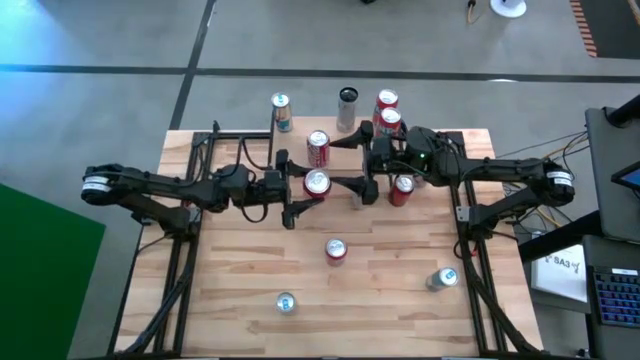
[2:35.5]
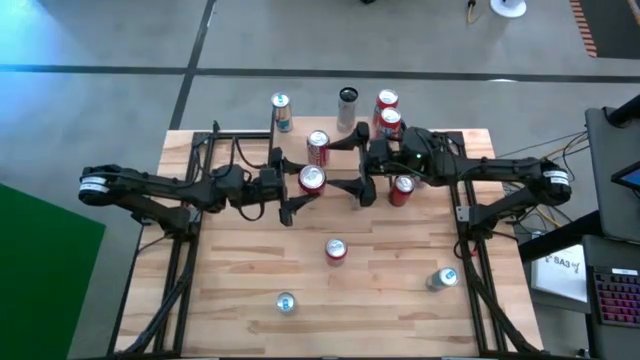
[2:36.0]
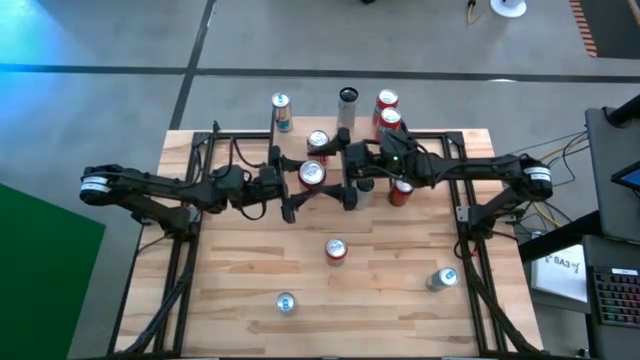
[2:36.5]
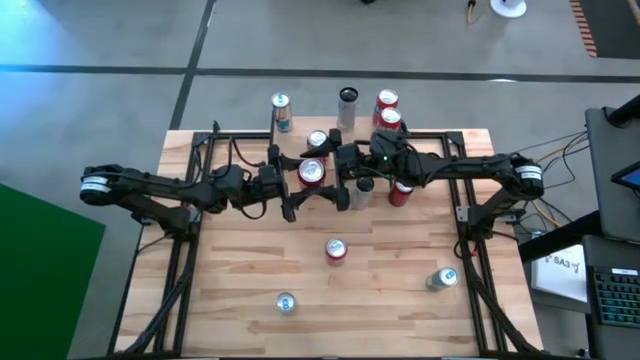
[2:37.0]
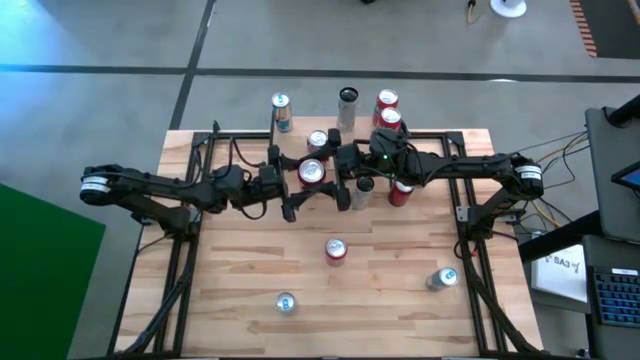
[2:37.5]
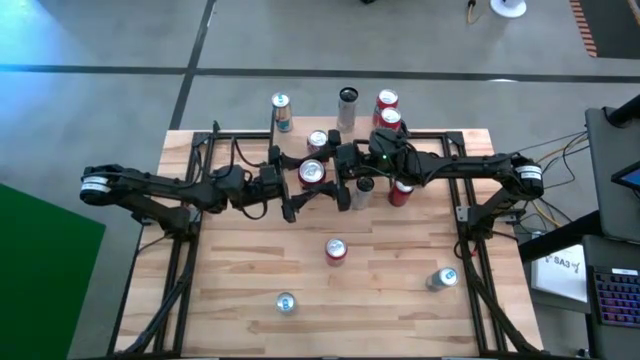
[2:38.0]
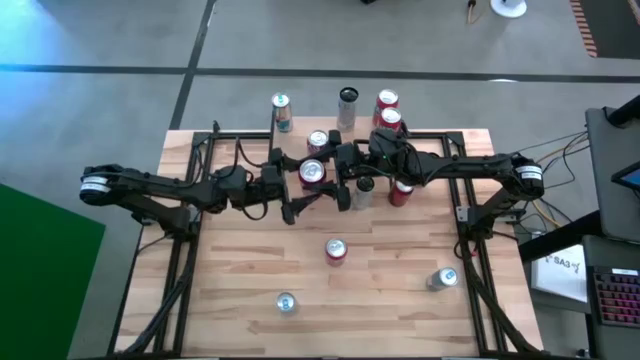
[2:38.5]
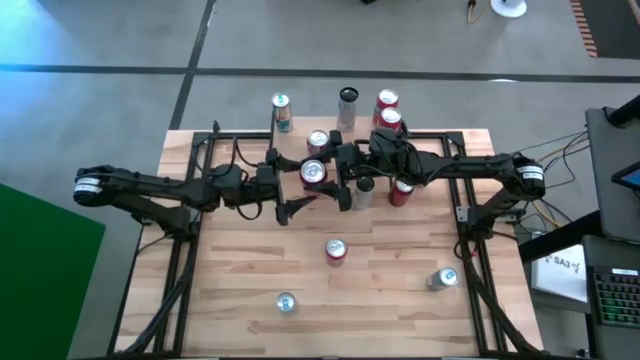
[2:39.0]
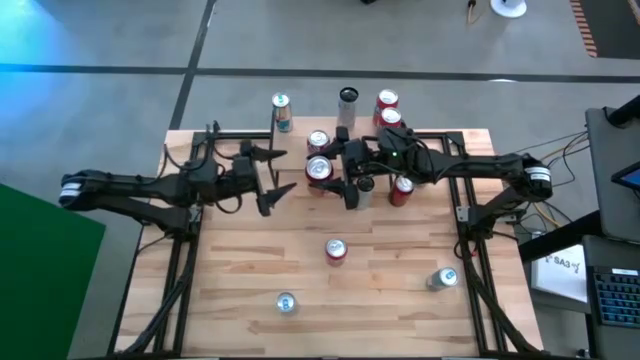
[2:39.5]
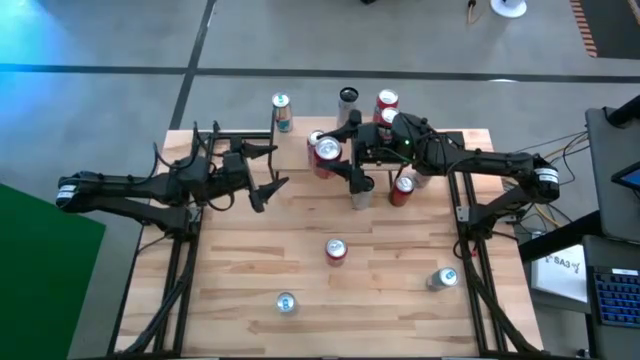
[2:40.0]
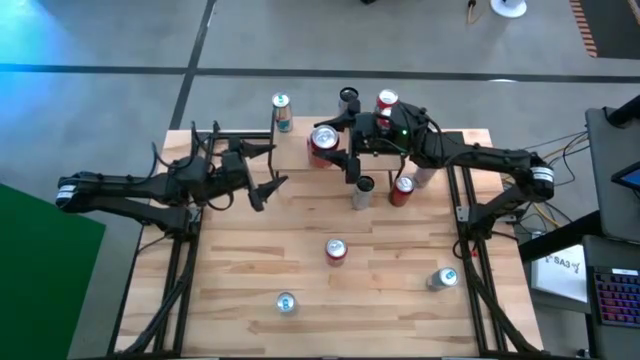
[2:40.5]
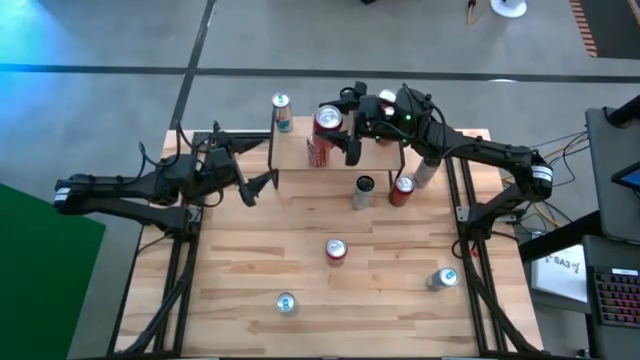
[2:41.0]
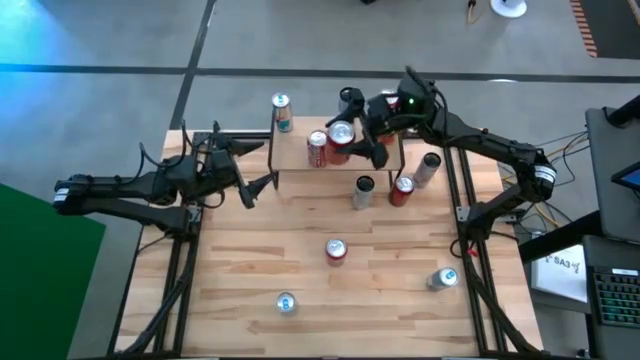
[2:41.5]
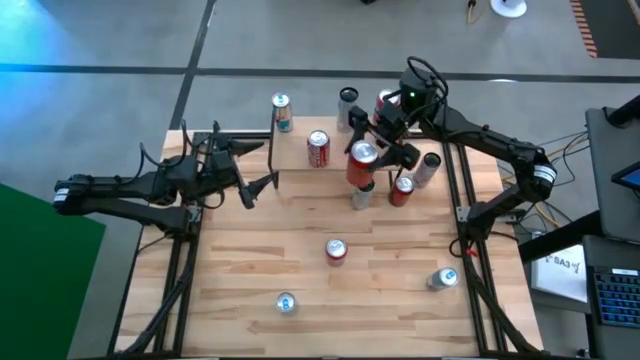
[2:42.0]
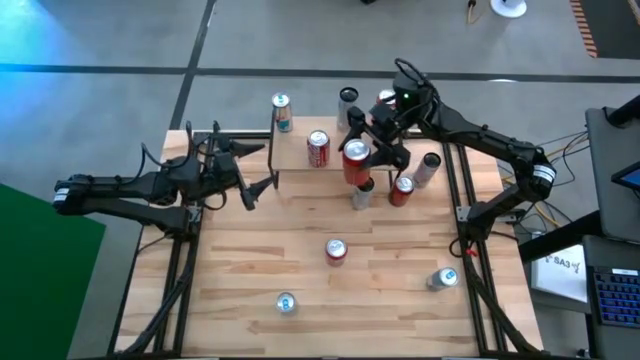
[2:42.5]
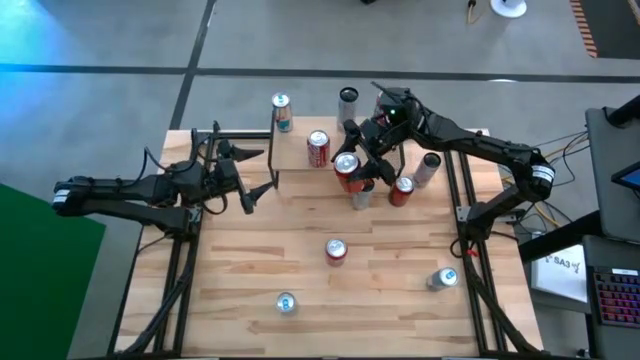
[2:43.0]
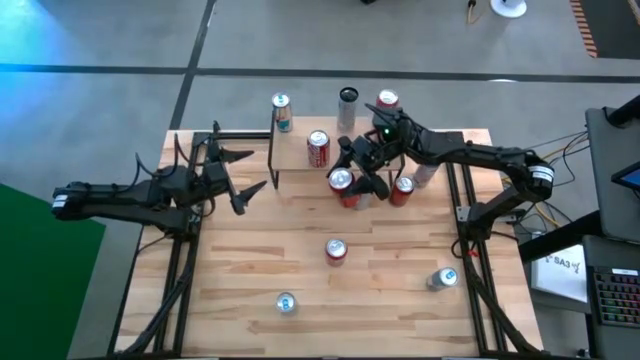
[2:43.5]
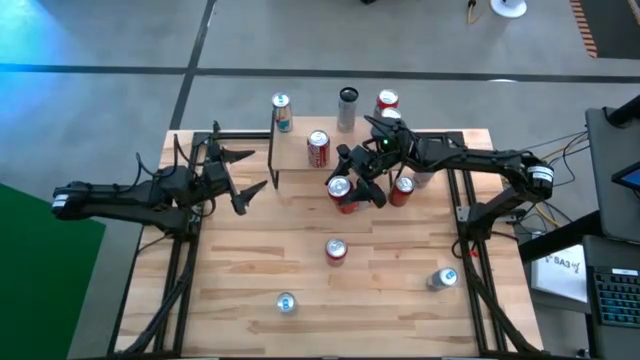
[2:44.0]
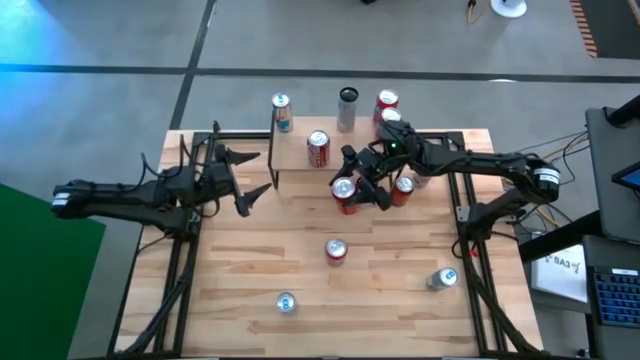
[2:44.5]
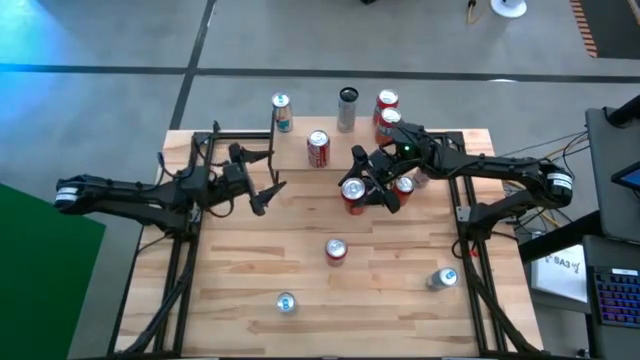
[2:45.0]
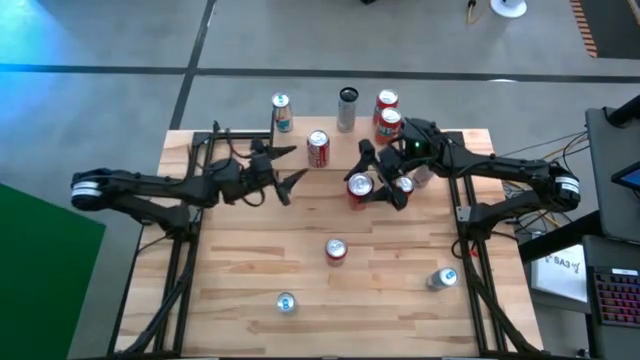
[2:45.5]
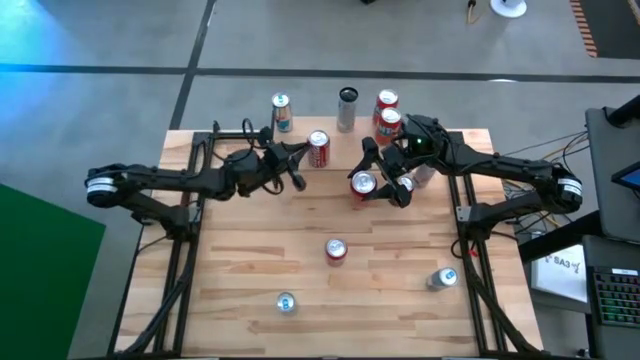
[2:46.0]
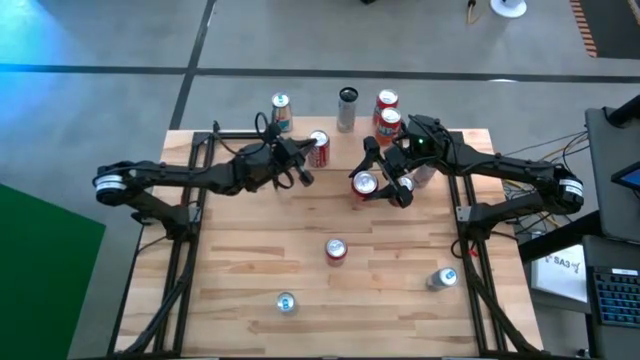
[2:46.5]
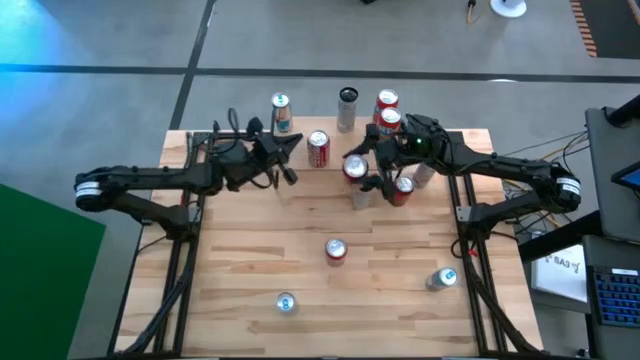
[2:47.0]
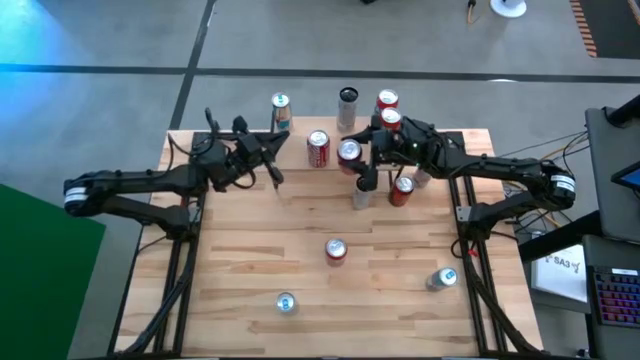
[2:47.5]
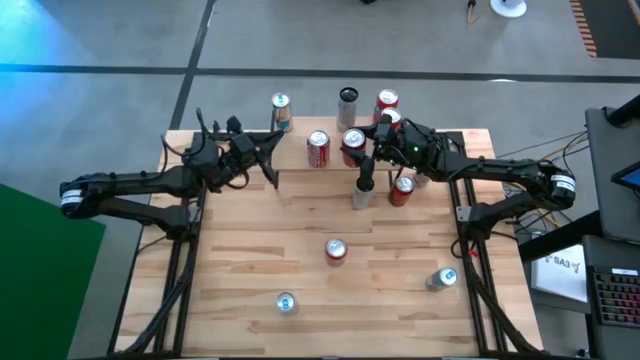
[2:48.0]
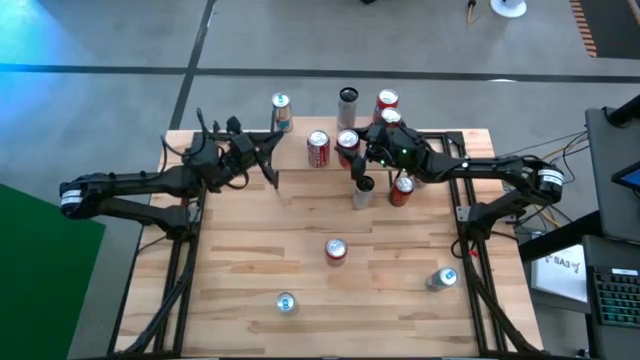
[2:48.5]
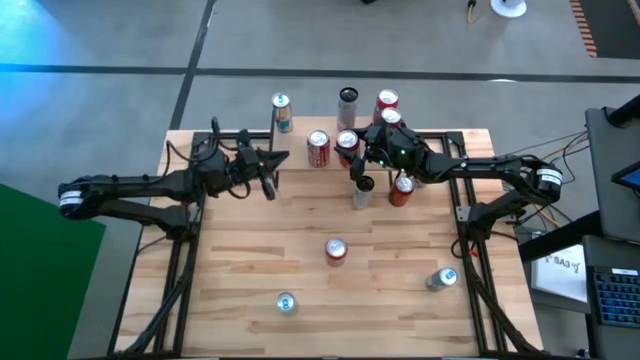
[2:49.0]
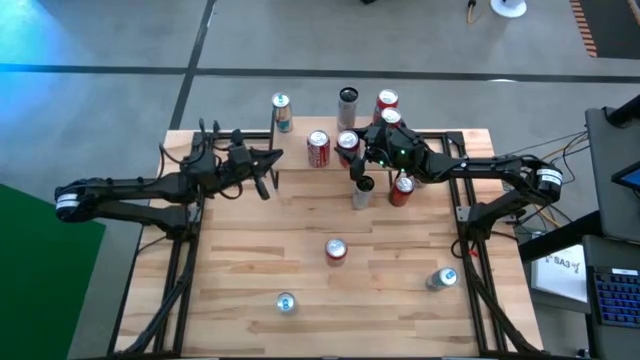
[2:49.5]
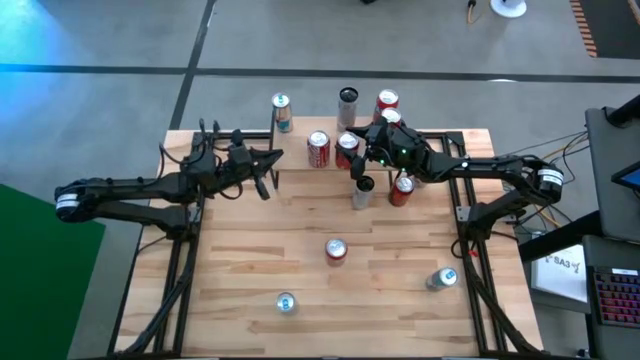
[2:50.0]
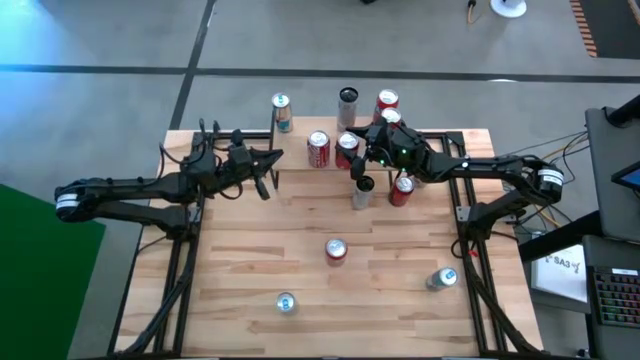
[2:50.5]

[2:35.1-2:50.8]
Task: Place canned beverage on shelf
Put the top red black soda can on the shelf

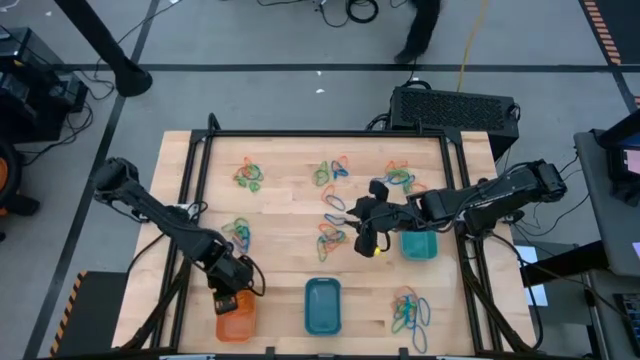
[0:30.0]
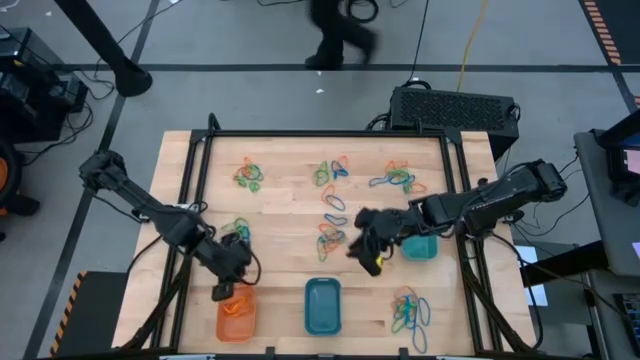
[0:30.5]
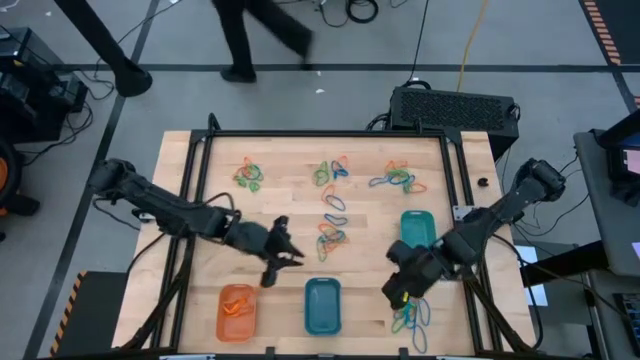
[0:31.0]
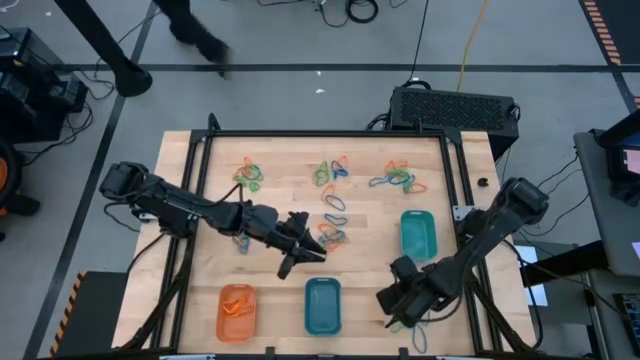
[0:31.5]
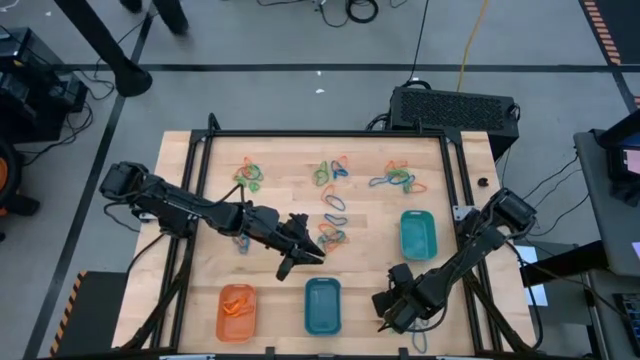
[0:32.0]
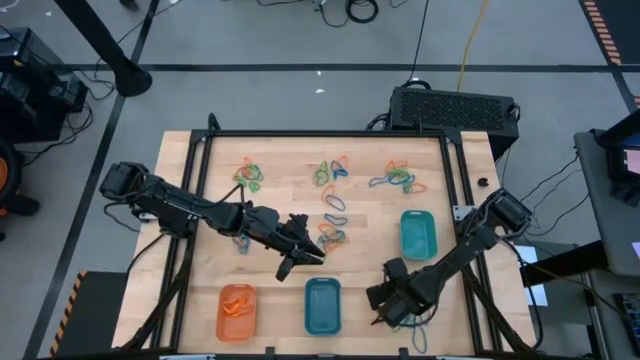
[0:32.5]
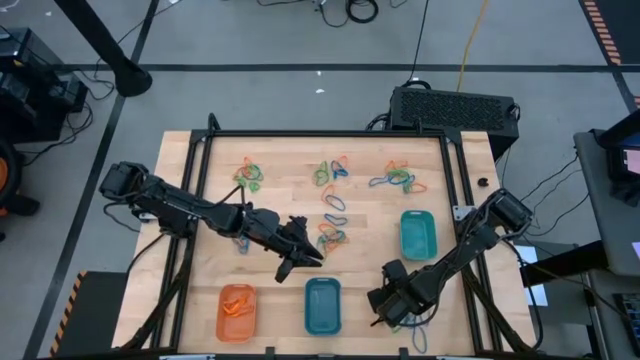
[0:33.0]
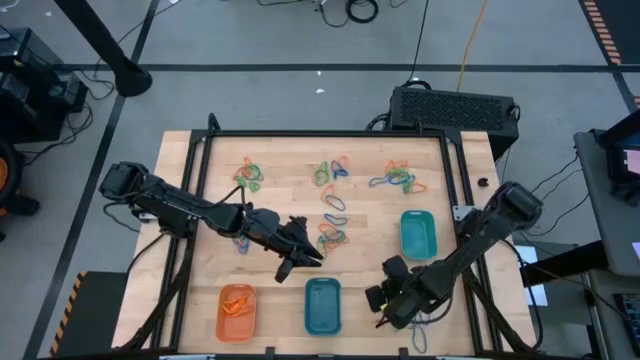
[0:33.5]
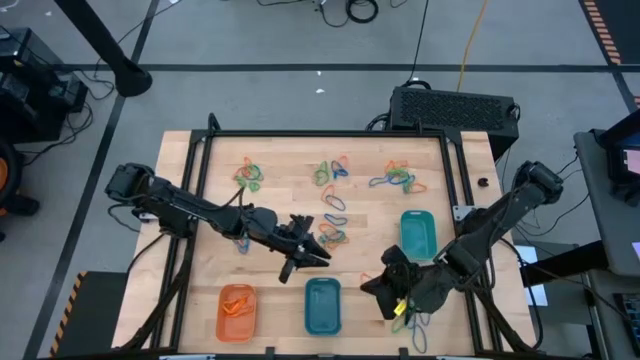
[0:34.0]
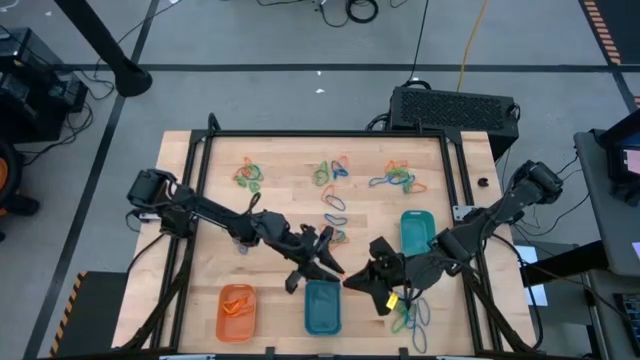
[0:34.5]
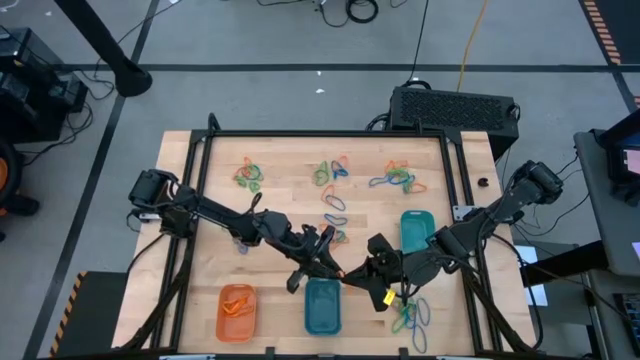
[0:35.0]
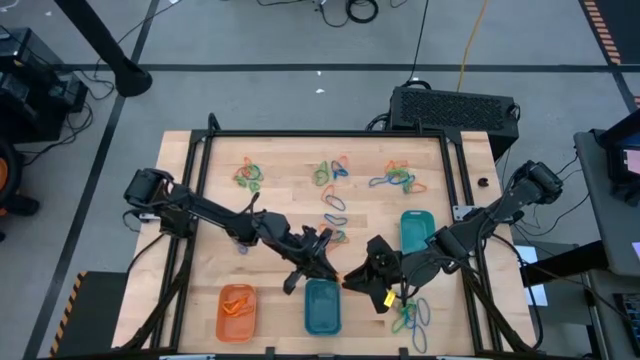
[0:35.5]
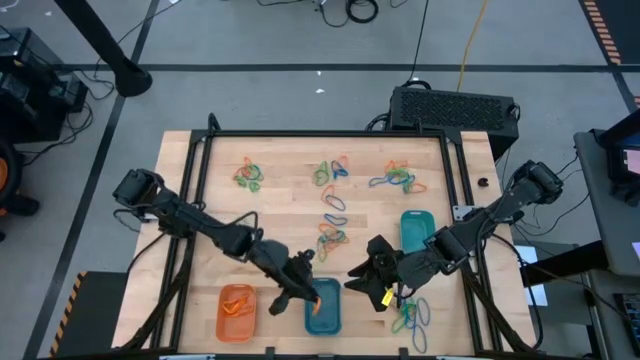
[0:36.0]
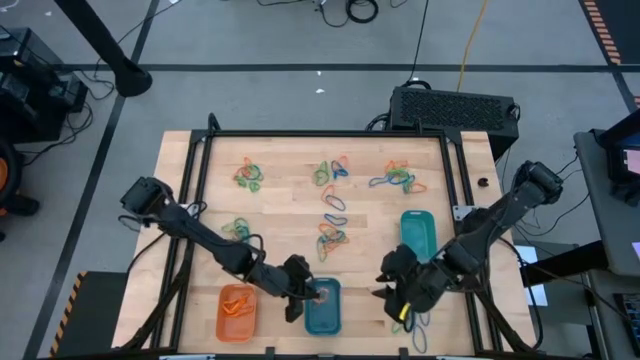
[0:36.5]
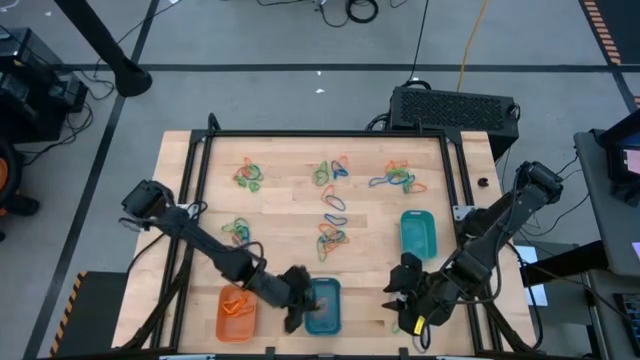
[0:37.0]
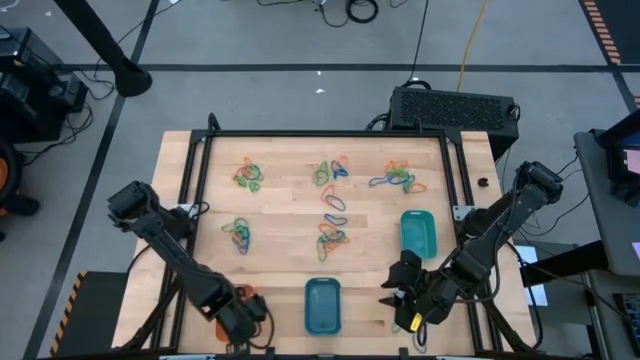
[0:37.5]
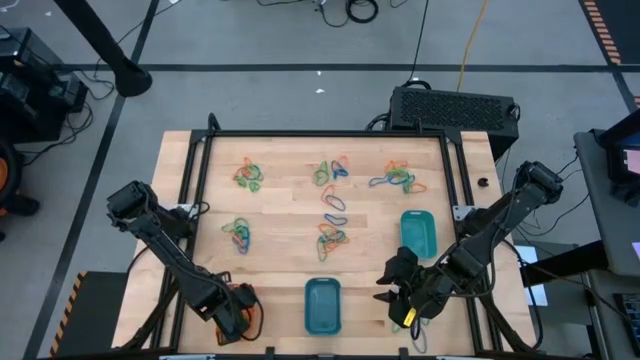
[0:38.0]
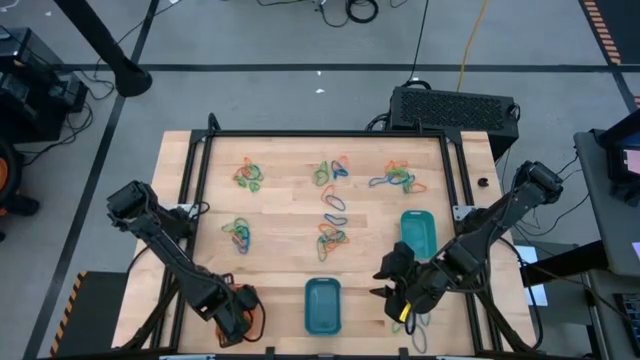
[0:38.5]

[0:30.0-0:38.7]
Task: Sort rubber bands into baskets
Put the orange rubber band into the orange bin
